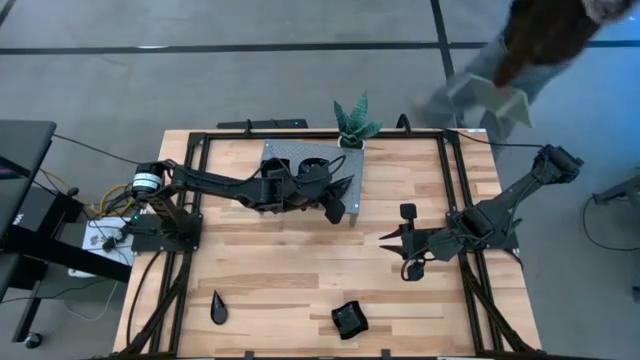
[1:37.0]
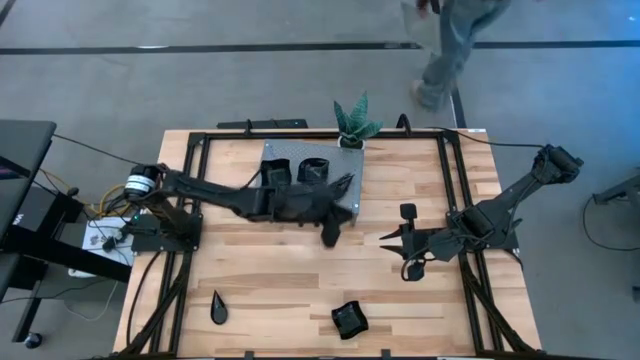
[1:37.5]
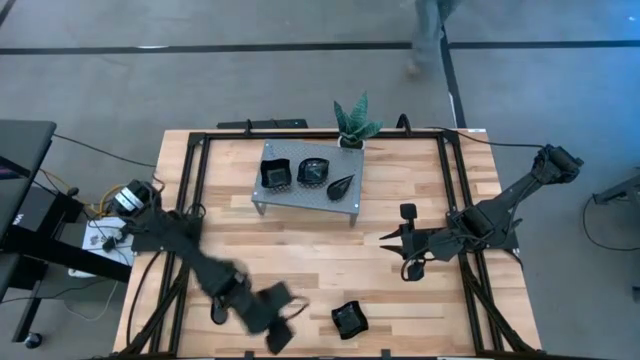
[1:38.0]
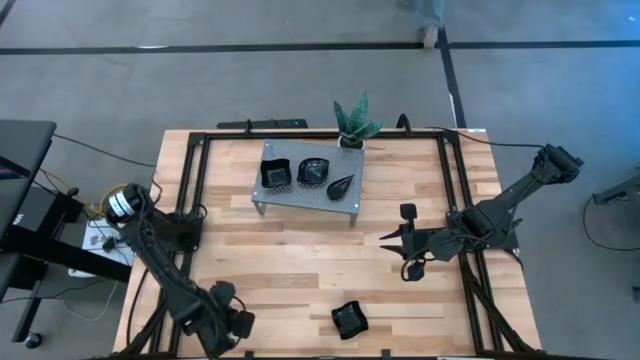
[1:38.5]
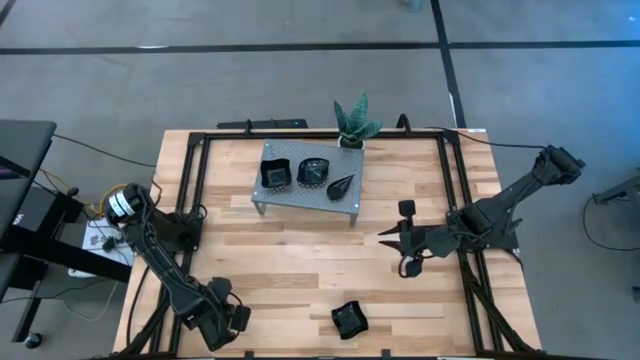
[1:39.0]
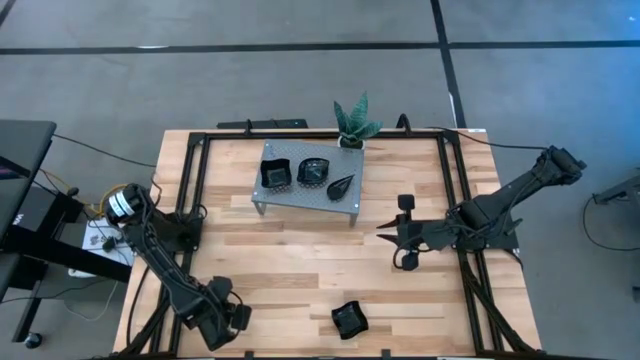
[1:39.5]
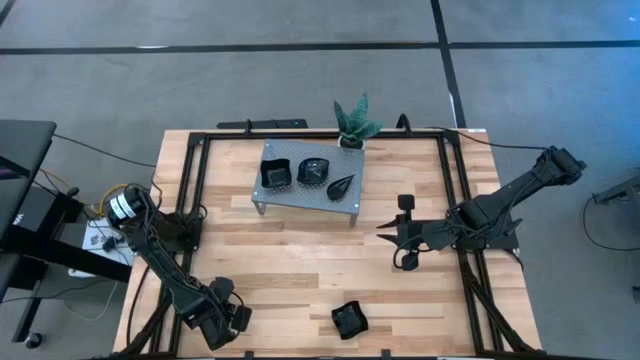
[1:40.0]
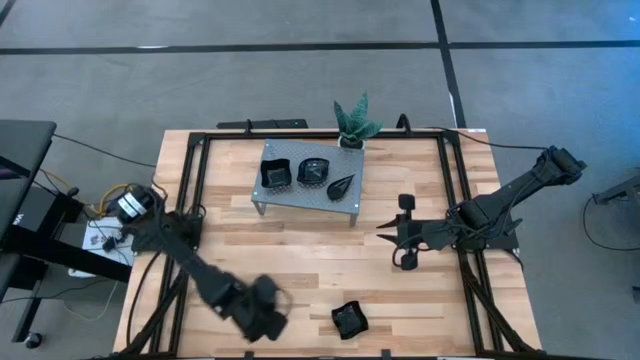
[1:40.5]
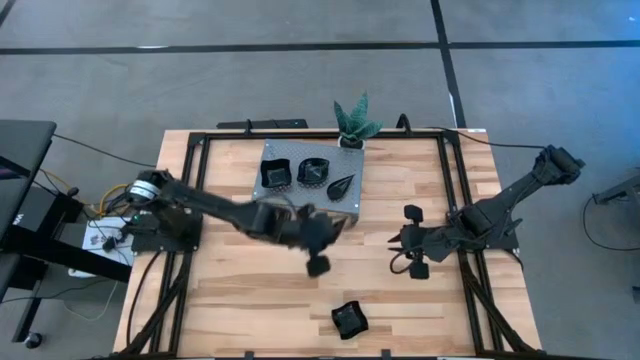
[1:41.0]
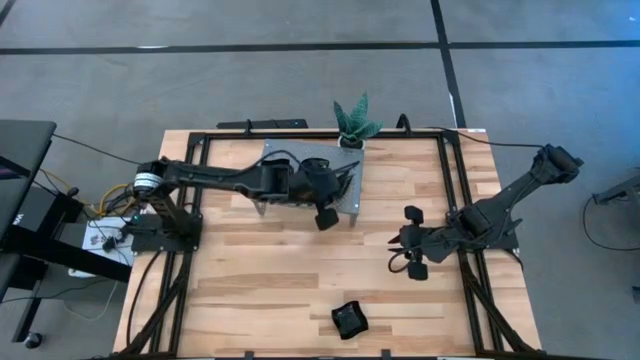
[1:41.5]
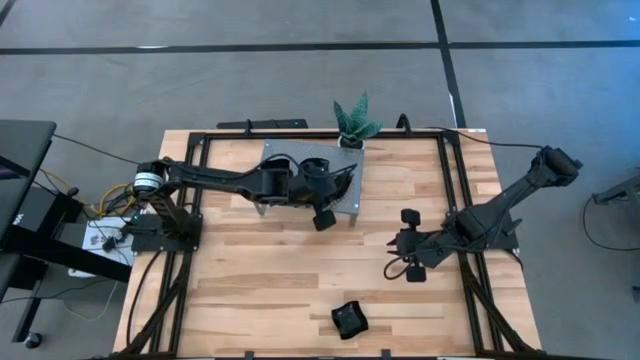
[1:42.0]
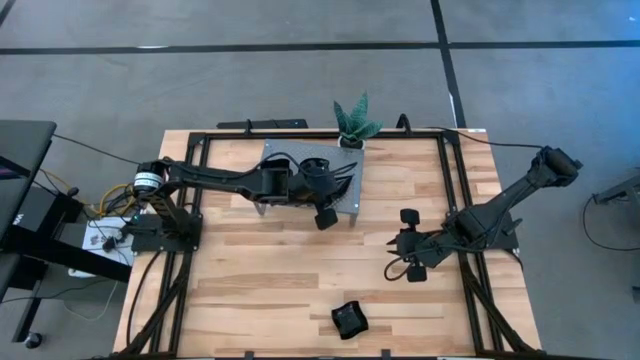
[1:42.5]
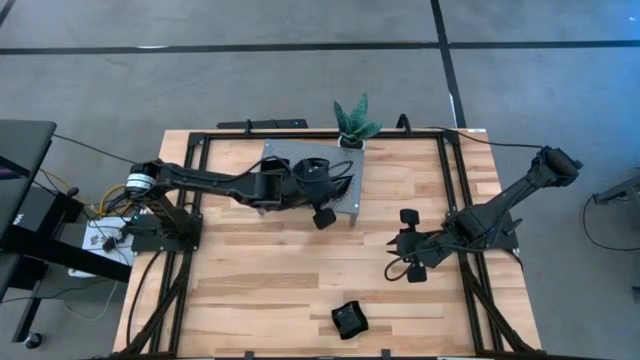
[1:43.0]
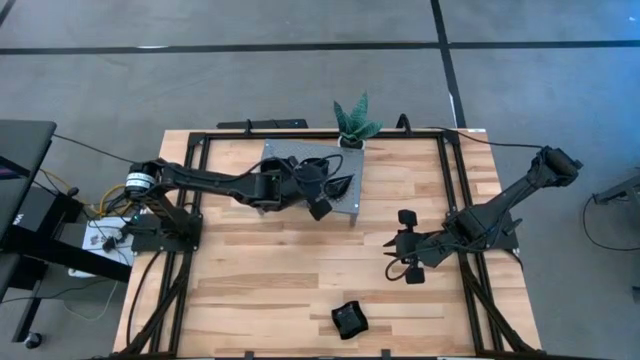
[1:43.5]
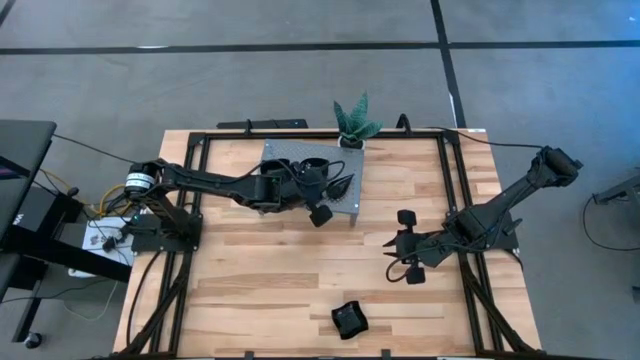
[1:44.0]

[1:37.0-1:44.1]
Task: Pick & Place Mini shaped plates
Stack the black drop shaped plate on top of the black drop shaped plates on the shelf

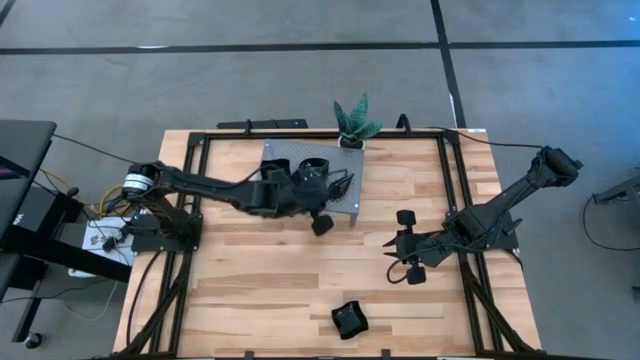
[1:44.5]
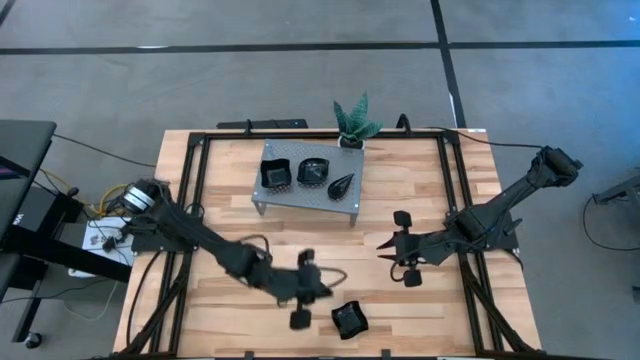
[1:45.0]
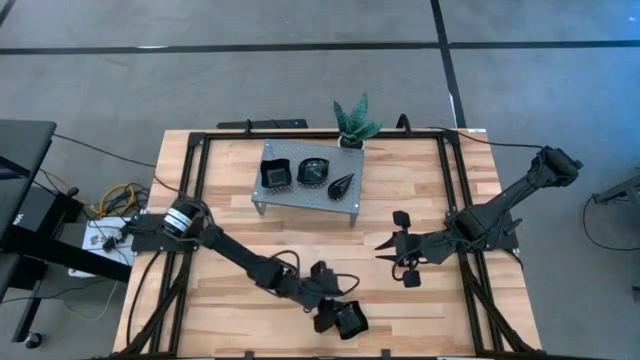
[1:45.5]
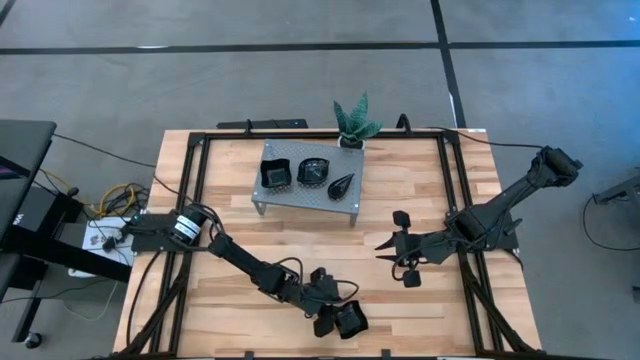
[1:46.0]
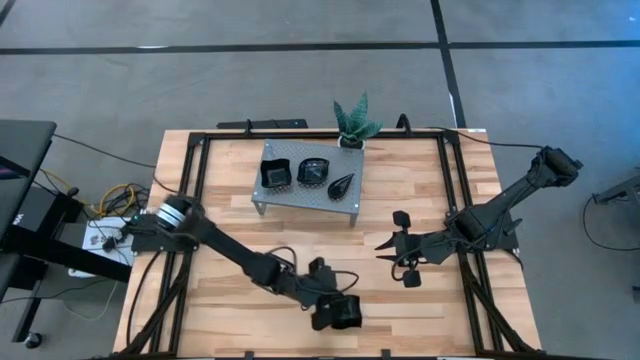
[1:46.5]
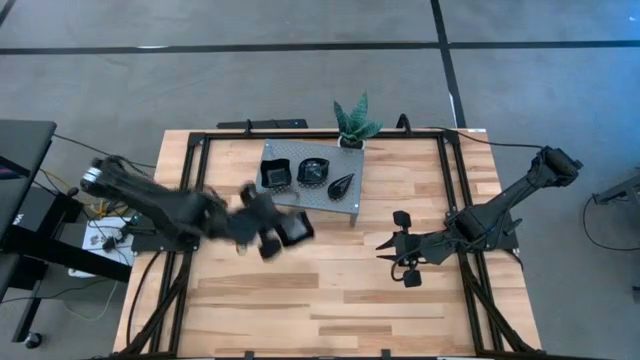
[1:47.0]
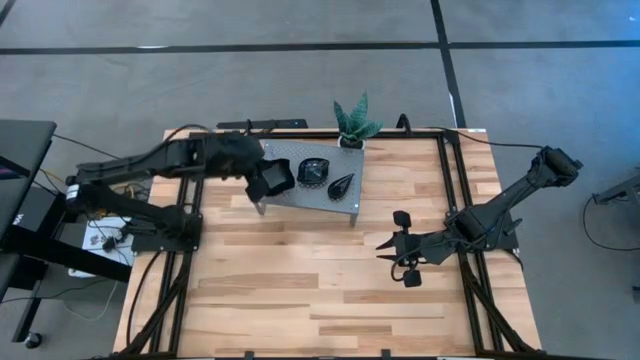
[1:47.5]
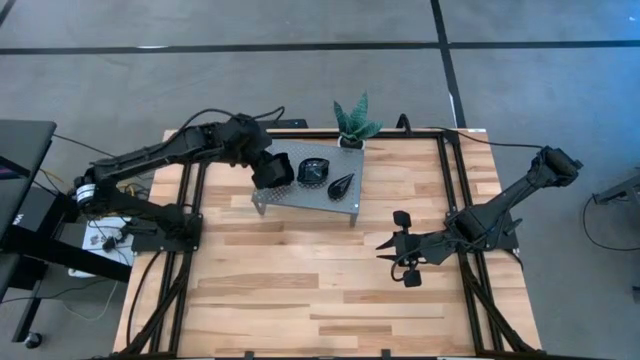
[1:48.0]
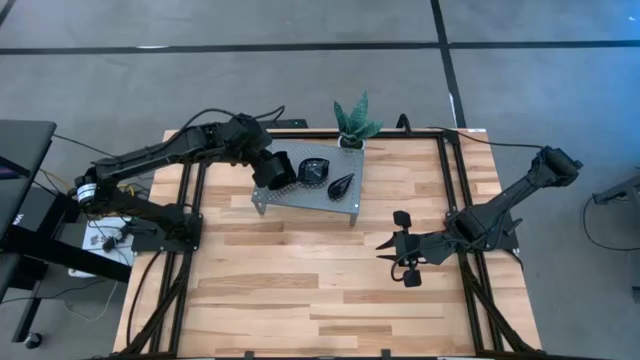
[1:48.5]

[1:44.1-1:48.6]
Stack the black distorted square plate on top of the black distorted square plates on the shelf

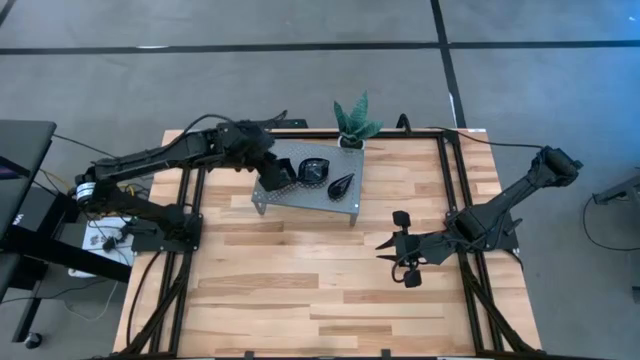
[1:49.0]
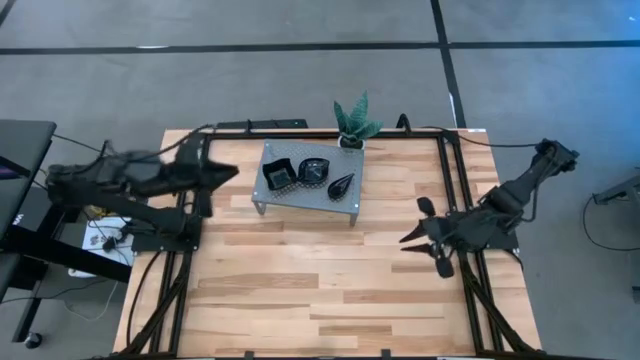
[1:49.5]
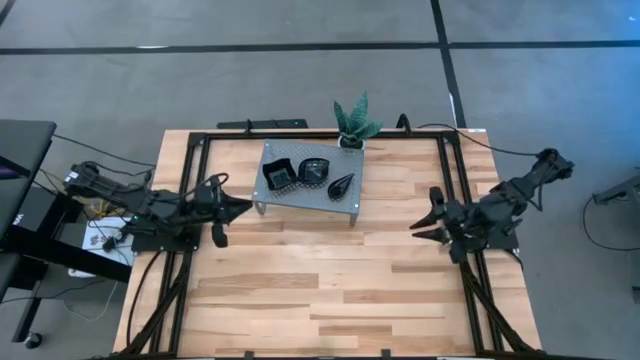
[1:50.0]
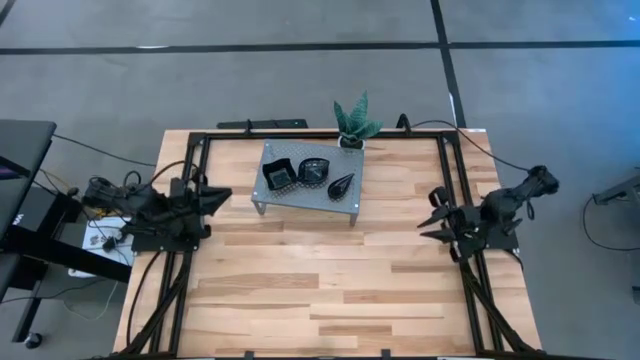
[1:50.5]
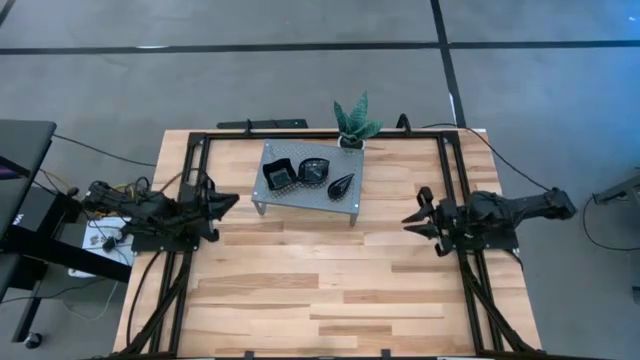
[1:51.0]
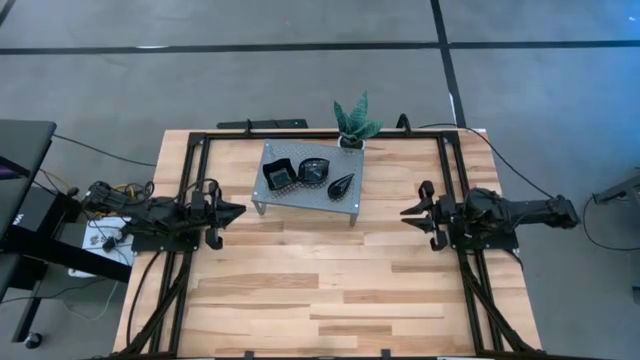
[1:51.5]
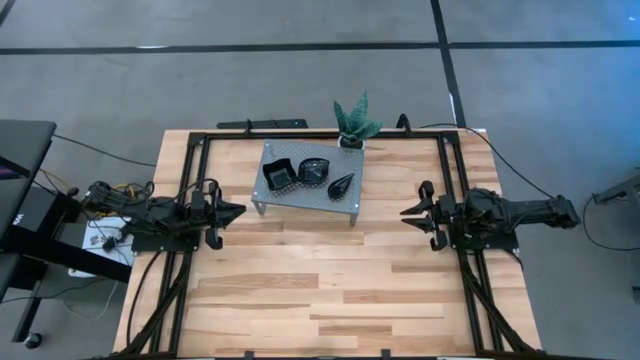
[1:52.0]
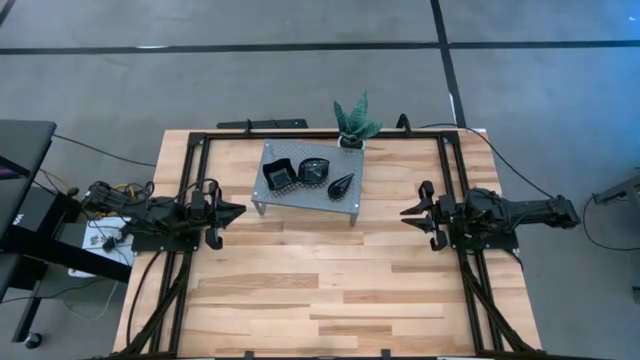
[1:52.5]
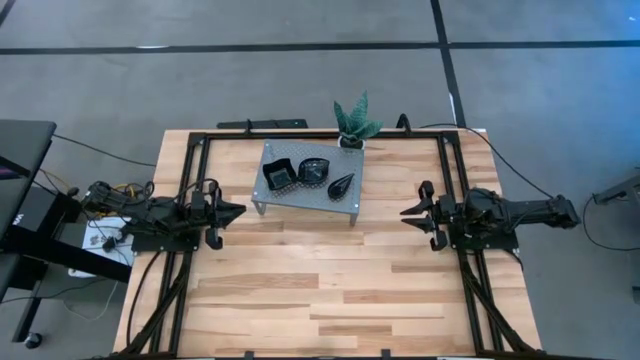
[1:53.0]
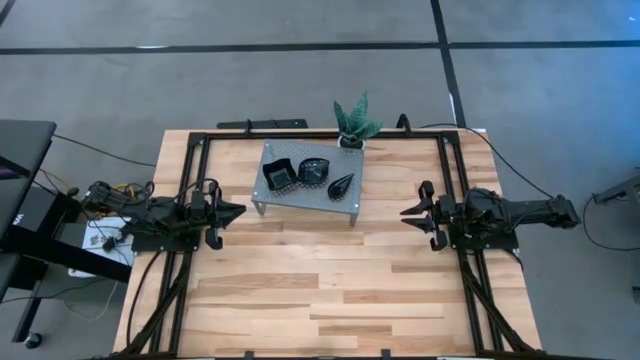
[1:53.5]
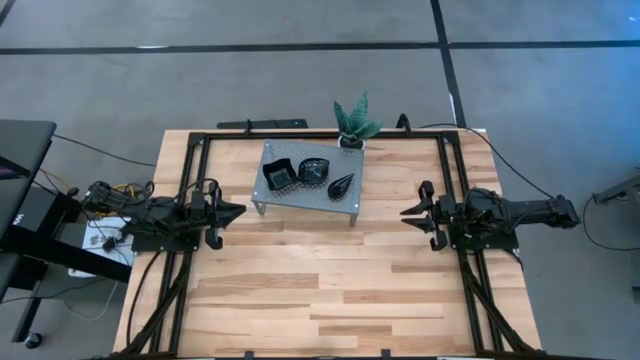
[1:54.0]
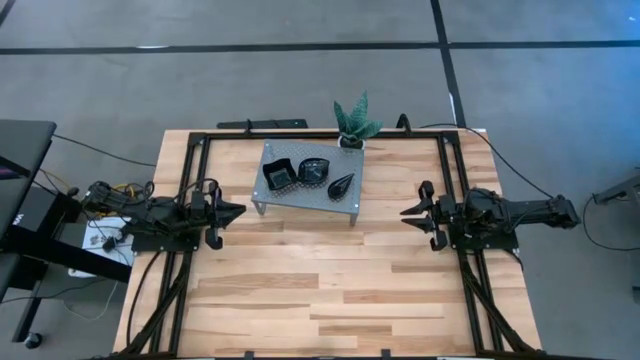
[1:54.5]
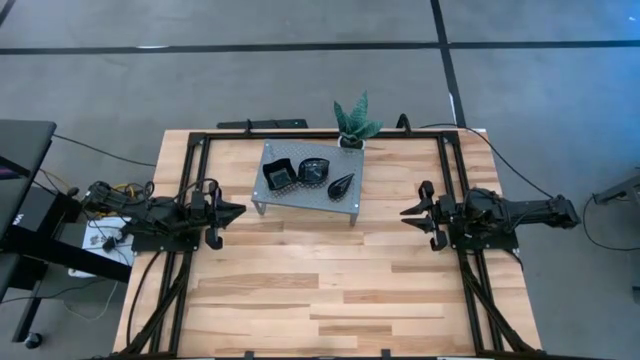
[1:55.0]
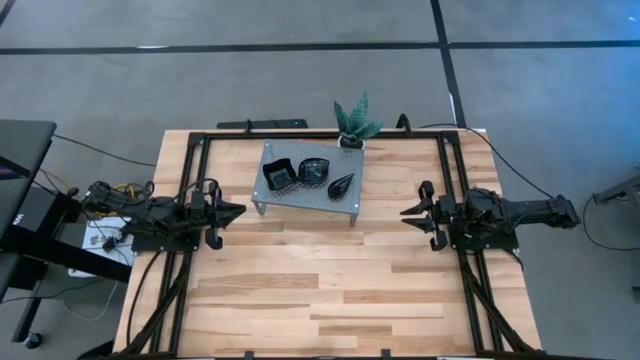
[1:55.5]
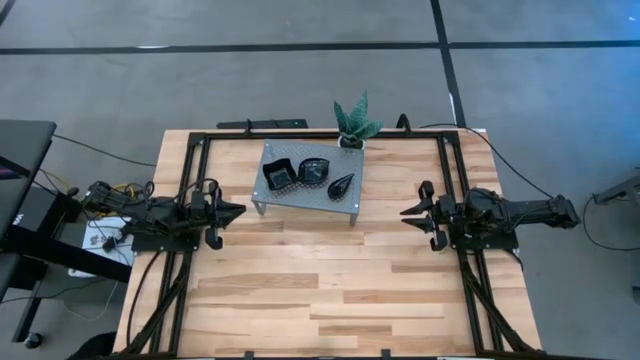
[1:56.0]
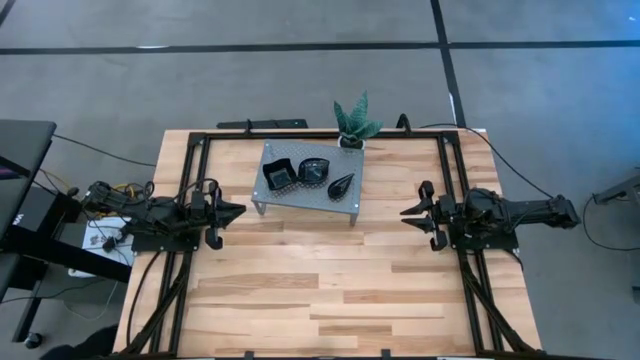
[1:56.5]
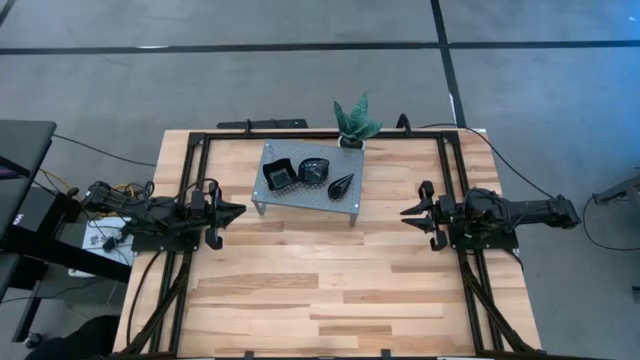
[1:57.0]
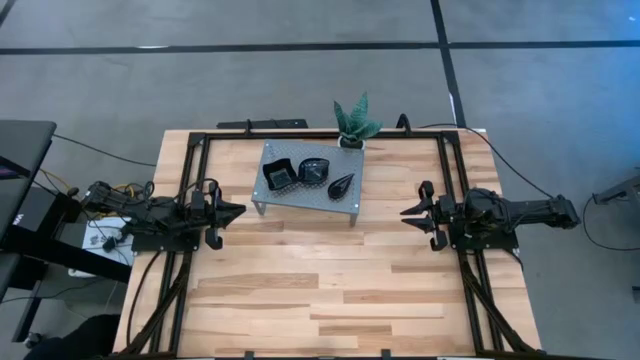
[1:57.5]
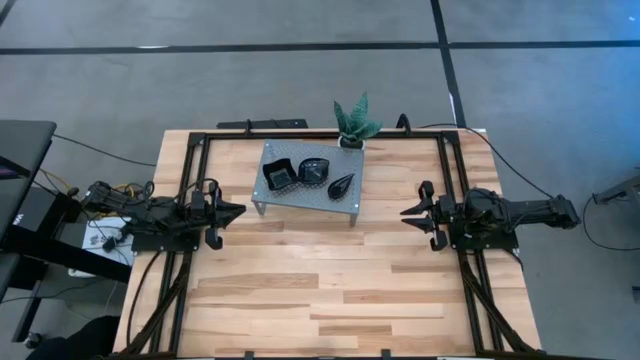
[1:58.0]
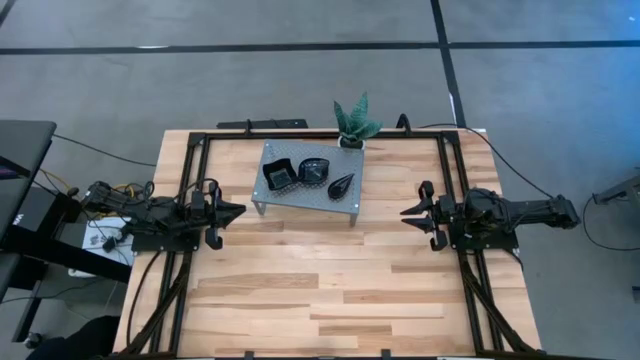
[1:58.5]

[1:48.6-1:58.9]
Return to Home Position
